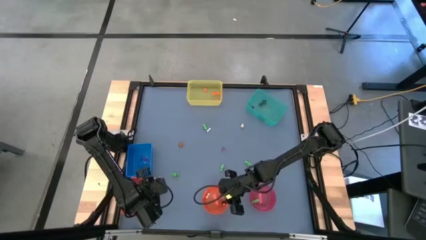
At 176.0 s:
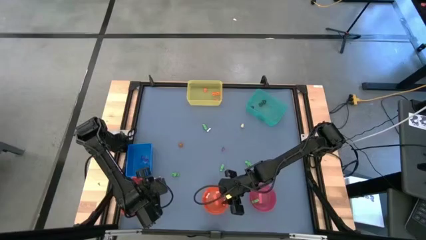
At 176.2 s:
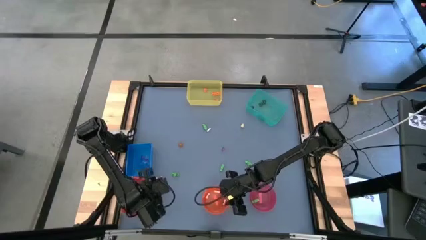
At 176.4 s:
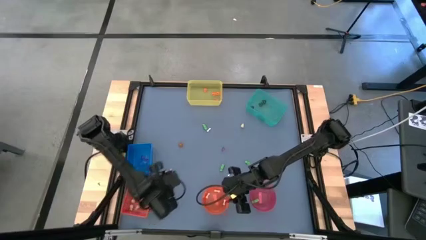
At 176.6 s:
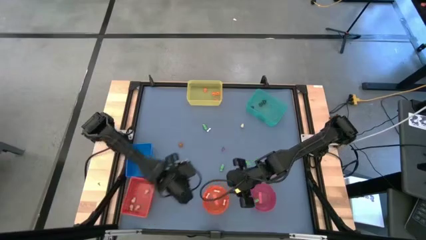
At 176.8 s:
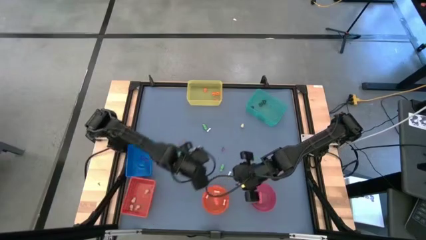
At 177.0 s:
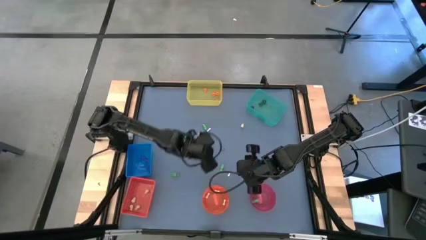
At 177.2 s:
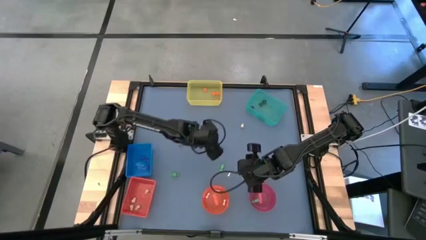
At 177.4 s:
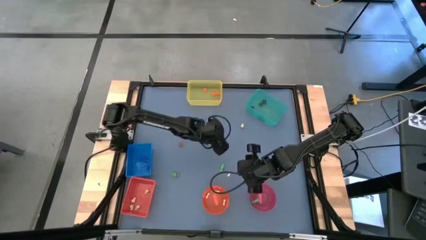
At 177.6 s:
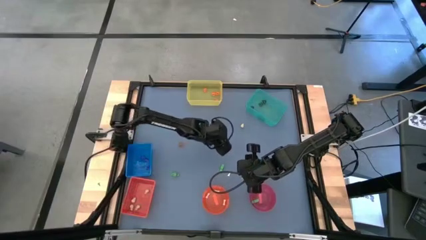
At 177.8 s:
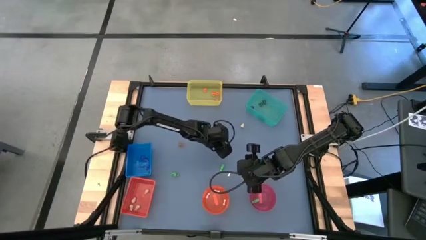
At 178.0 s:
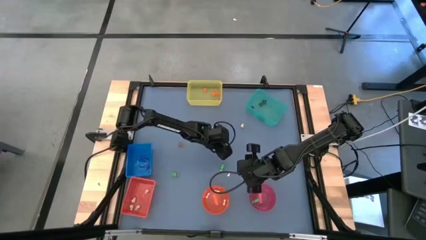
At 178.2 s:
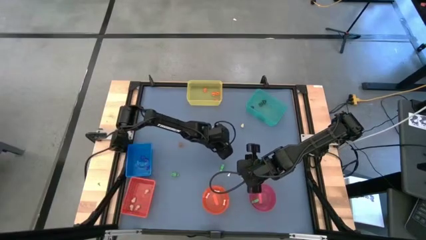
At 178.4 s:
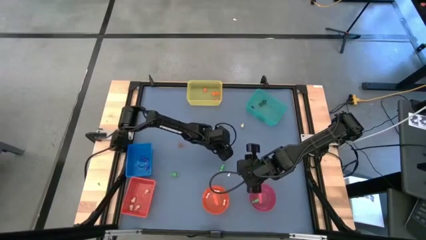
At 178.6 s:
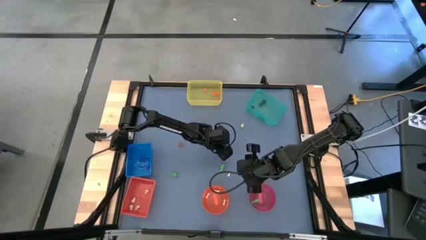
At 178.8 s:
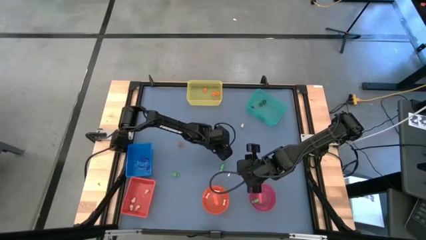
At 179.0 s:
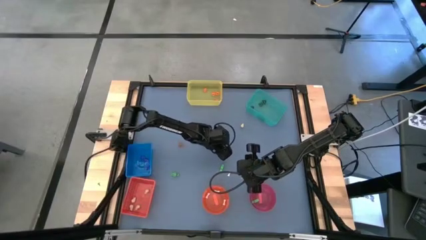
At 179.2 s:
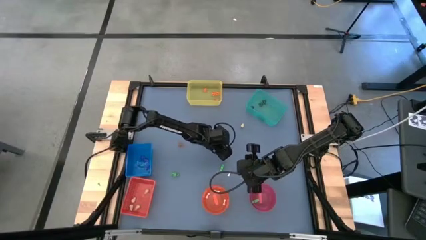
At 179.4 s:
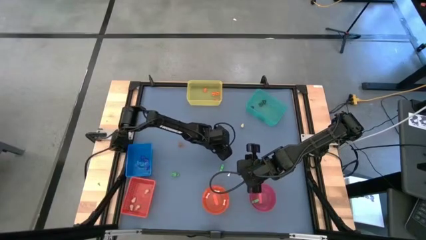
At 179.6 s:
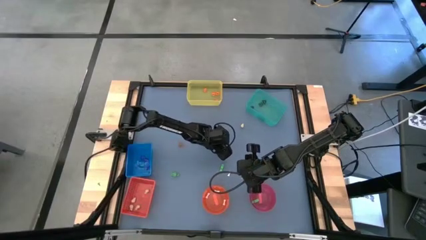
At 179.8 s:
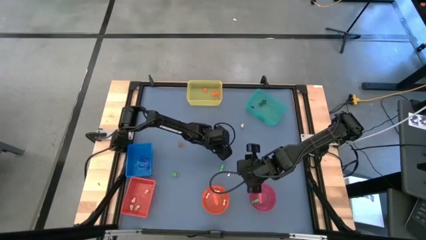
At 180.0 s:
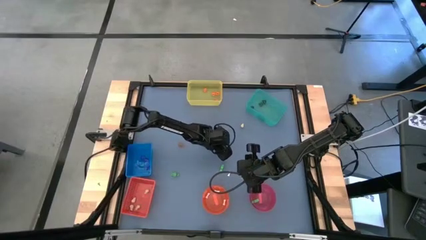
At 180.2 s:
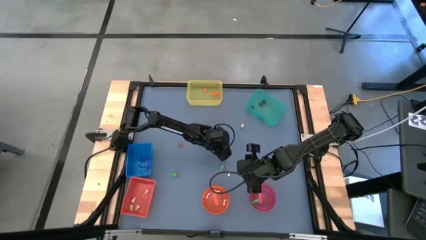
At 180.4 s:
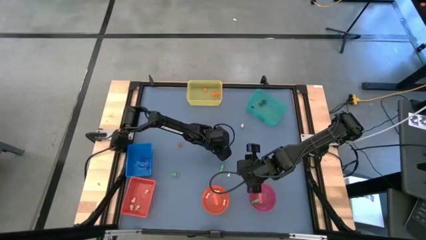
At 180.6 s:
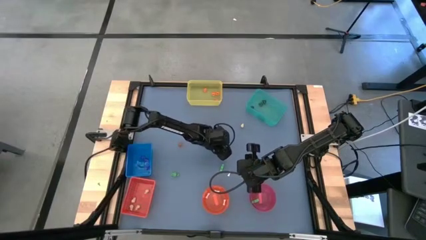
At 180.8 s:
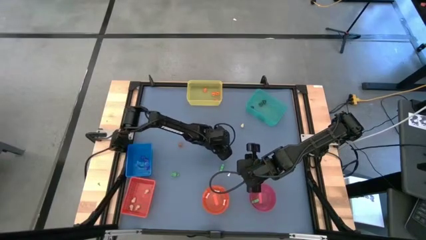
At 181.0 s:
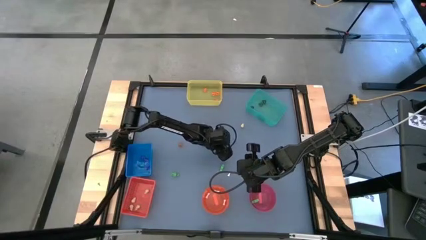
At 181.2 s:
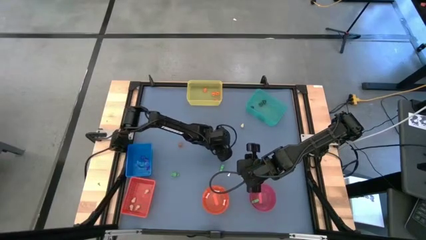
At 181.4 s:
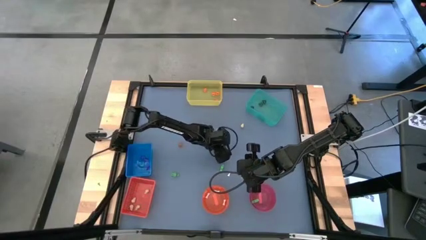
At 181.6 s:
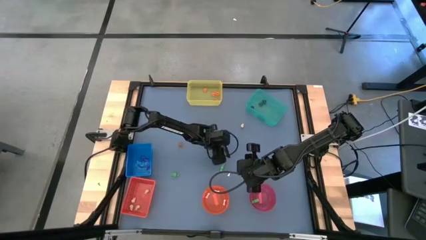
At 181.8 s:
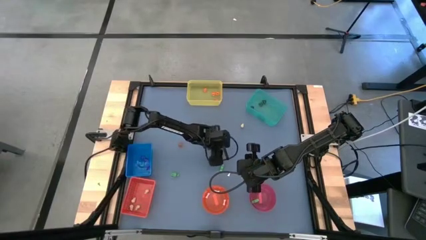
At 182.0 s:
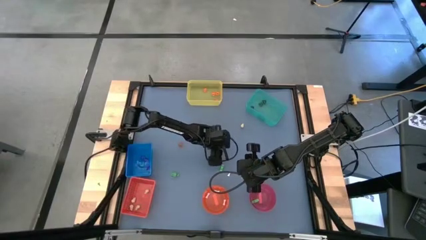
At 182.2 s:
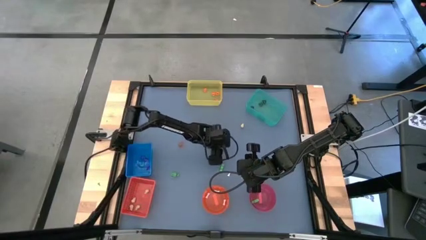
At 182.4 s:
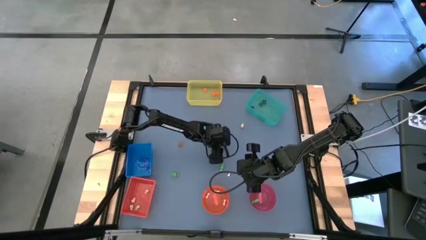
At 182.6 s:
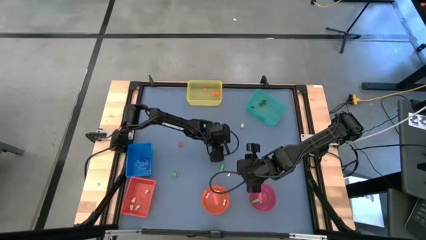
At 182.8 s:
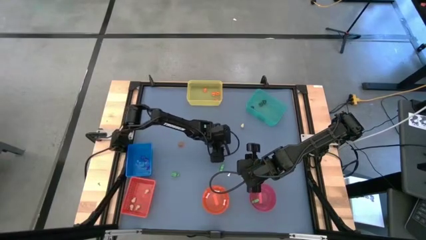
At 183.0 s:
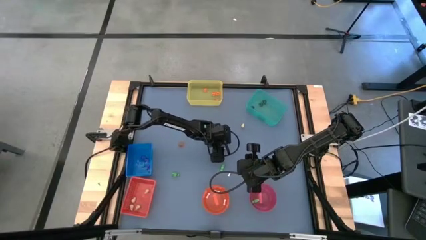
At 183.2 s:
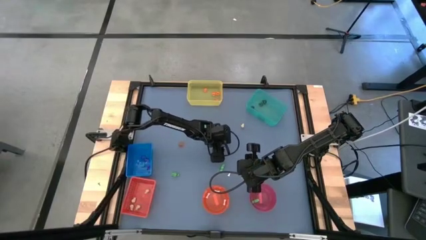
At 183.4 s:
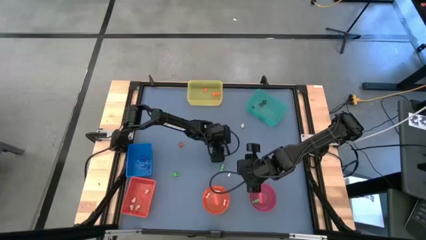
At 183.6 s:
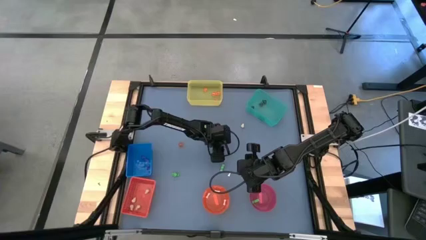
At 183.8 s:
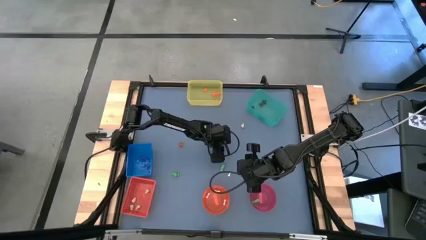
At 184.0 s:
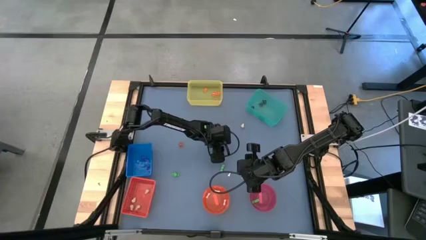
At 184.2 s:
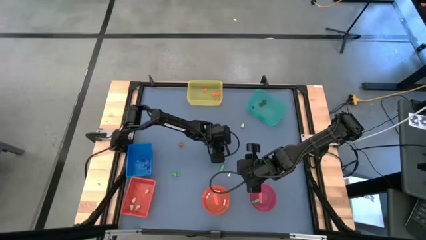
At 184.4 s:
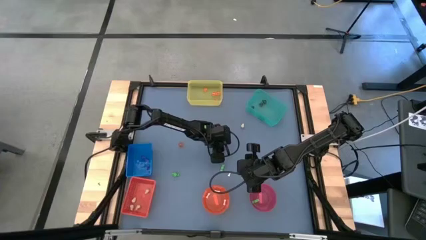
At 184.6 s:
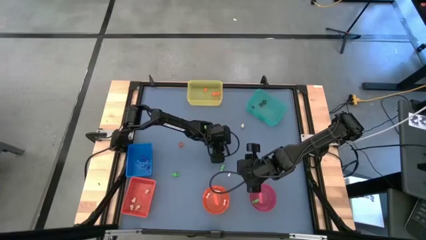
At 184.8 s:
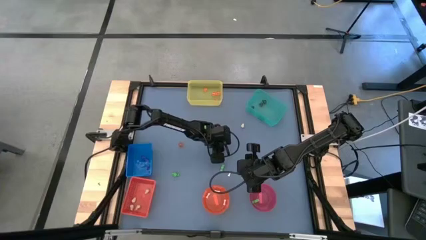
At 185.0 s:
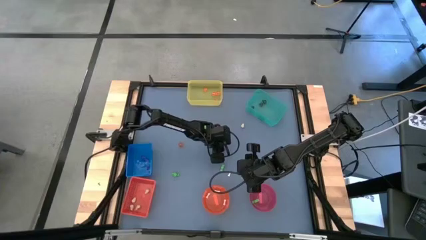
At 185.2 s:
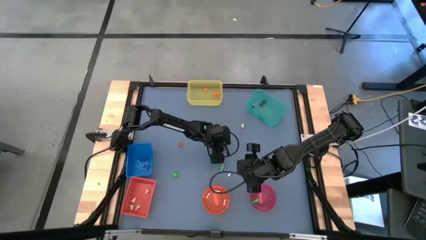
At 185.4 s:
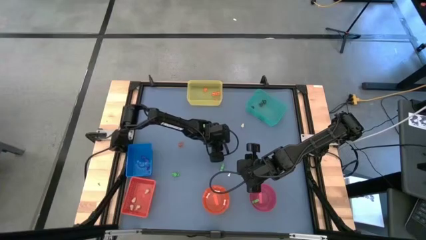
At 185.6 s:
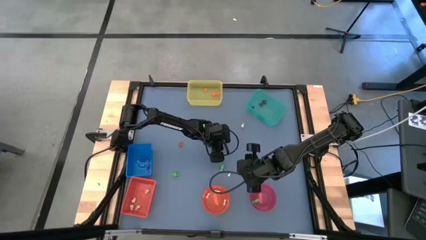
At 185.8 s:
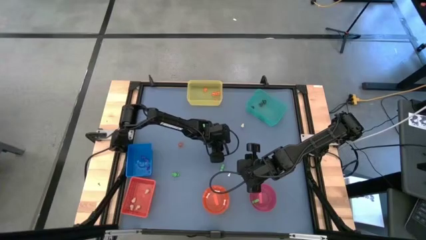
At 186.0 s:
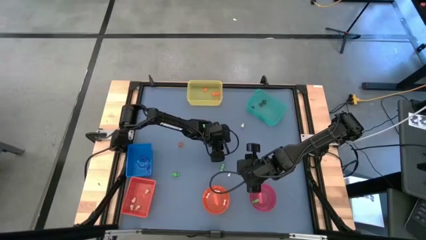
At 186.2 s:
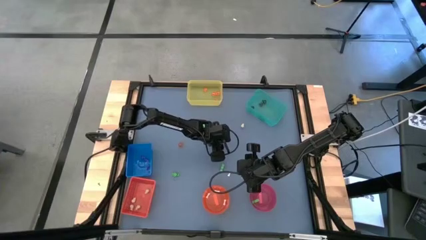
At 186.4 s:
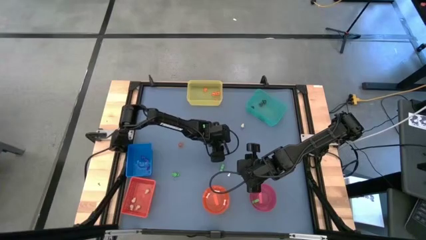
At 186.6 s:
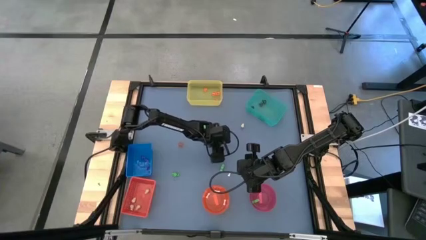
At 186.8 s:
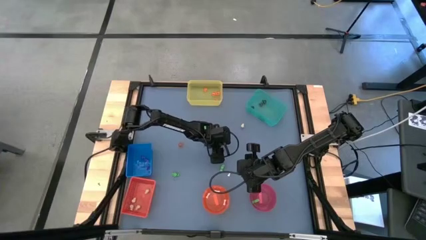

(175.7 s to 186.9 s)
Task: Sort Halloween decoration
Put the purple witch hat toy into the blue bin
